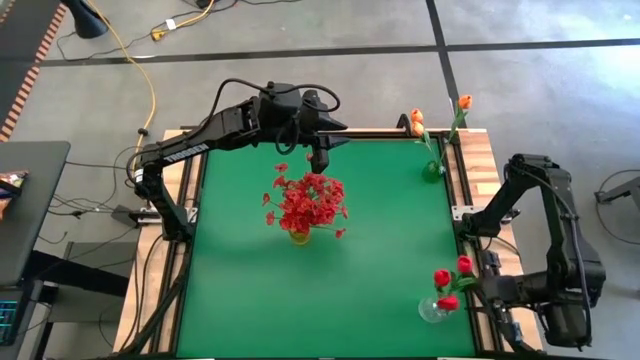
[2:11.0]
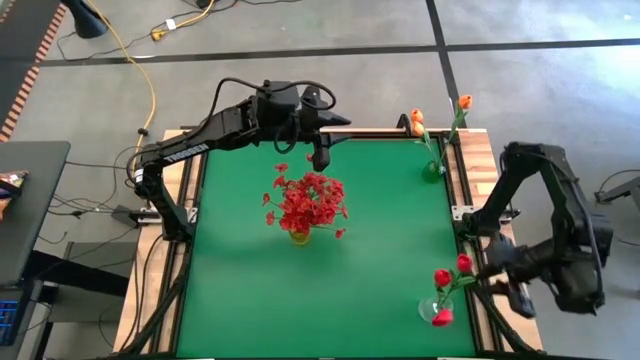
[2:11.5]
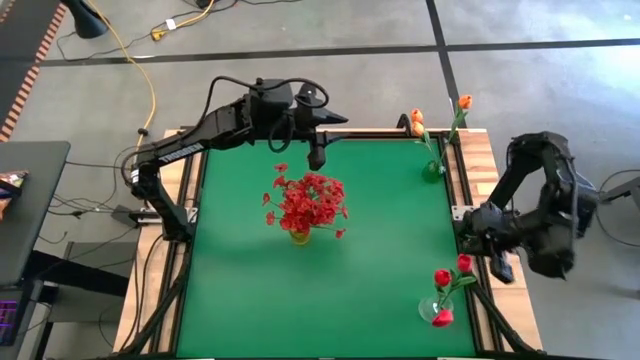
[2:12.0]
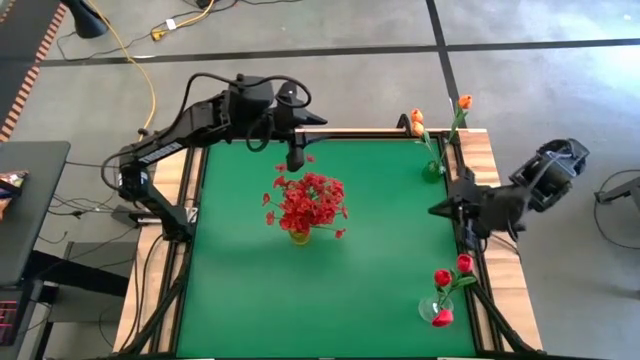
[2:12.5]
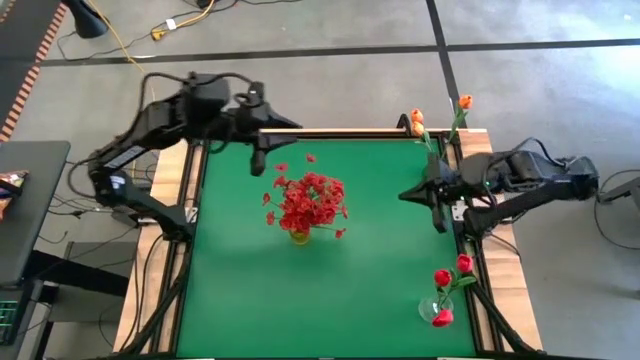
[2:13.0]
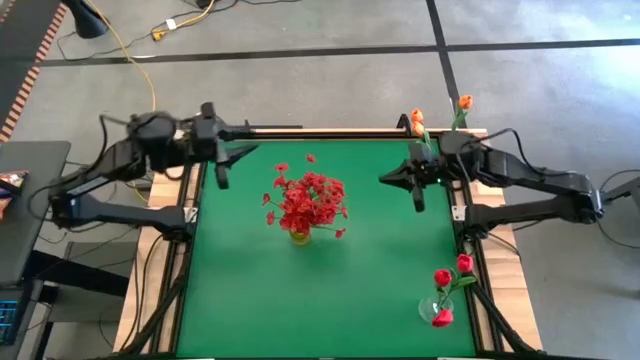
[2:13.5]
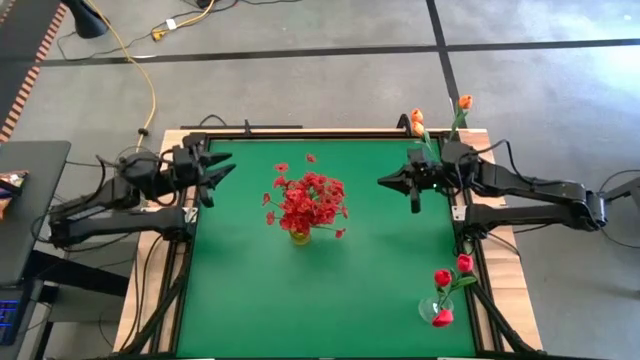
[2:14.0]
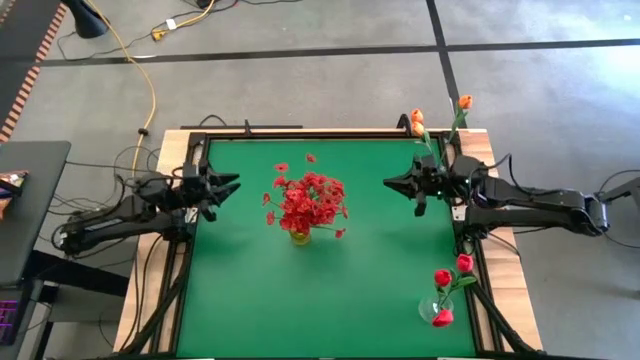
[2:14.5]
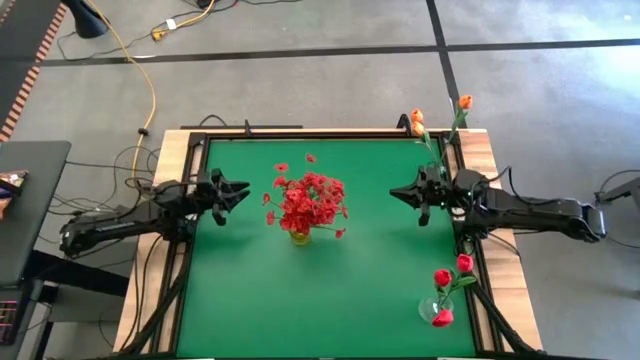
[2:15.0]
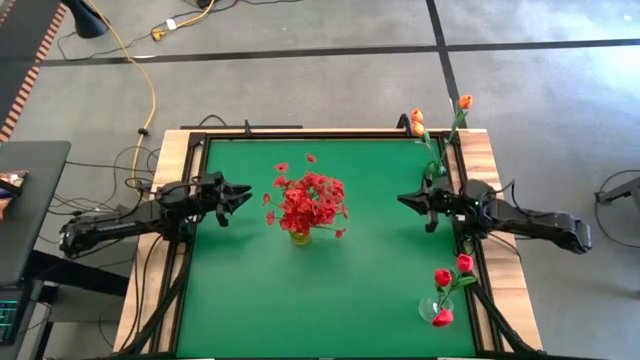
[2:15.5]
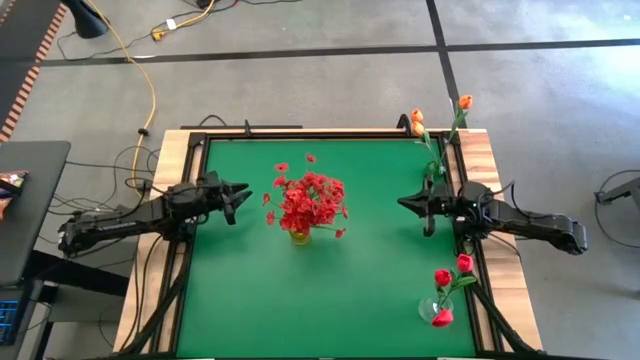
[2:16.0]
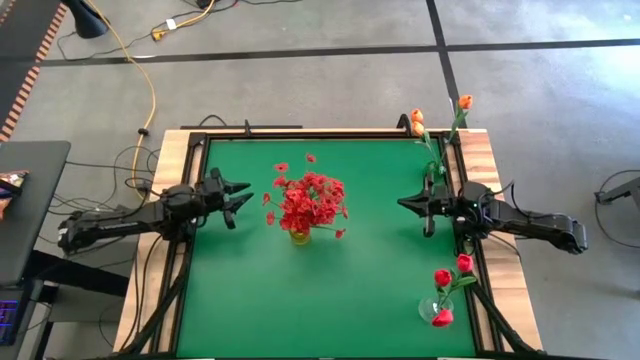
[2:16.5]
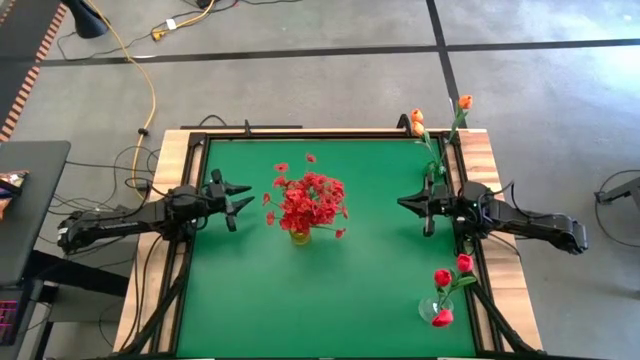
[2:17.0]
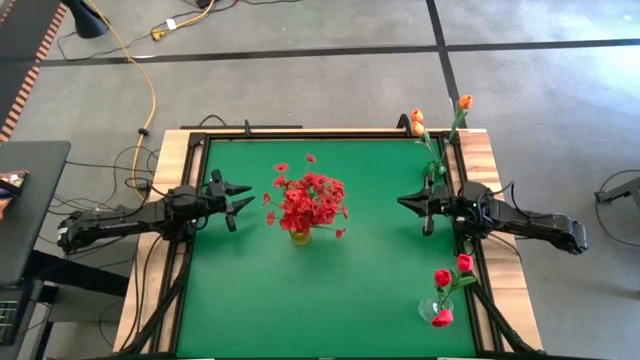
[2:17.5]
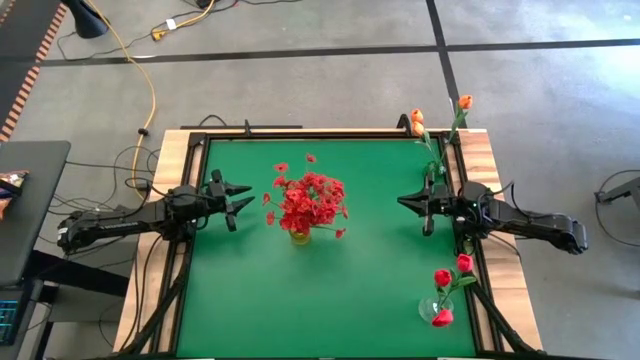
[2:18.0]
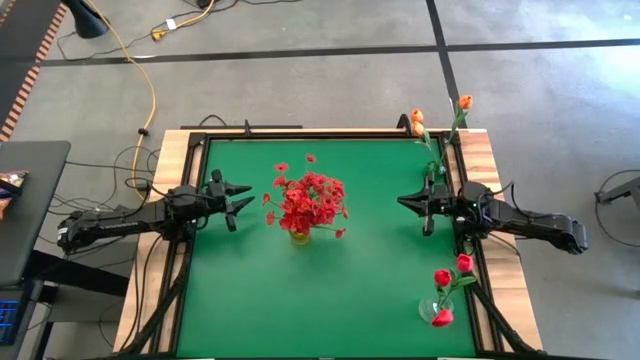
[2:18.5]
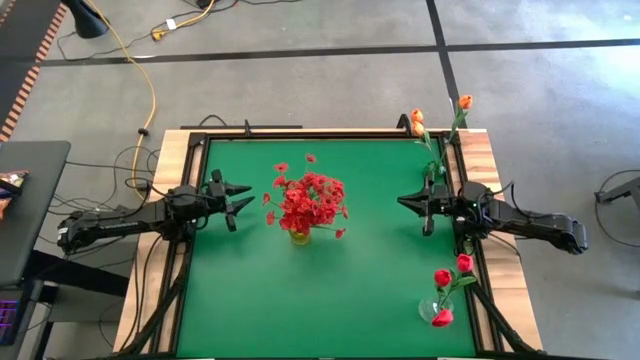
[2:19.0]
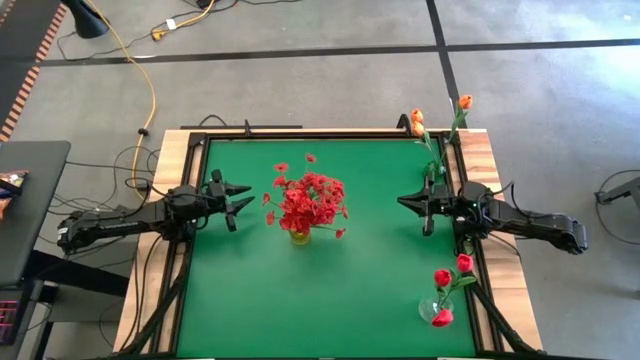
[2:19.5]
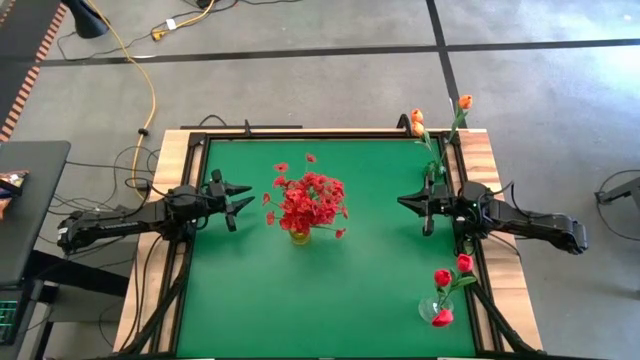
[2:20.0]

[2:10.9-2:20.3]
Task: Sort flowers into vase by color
Return to Home Position

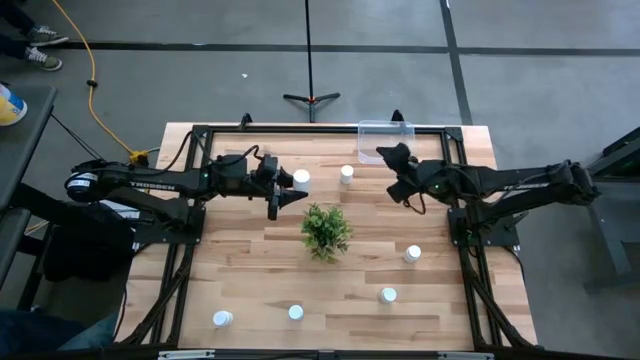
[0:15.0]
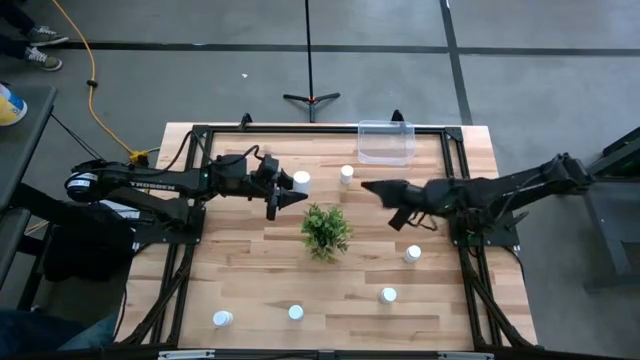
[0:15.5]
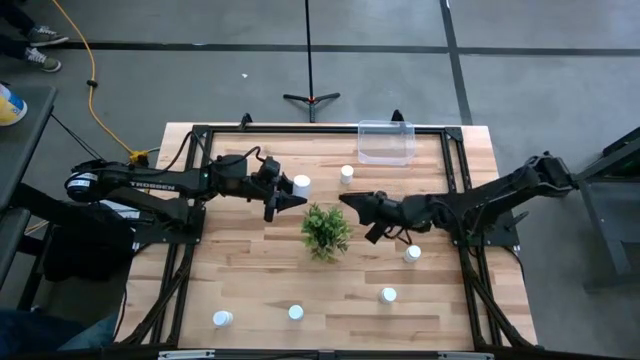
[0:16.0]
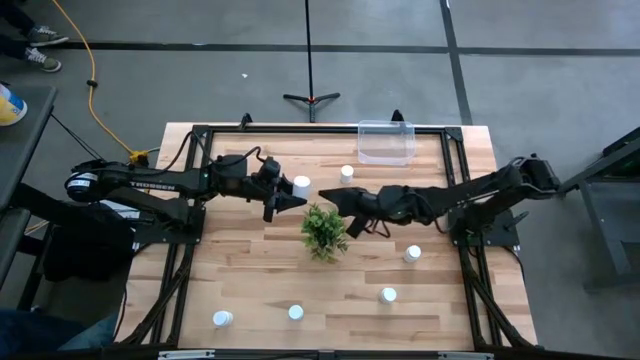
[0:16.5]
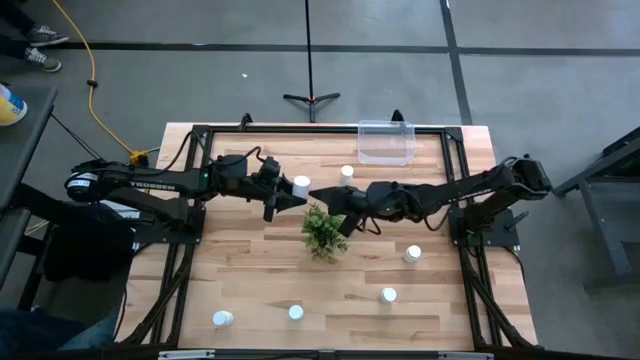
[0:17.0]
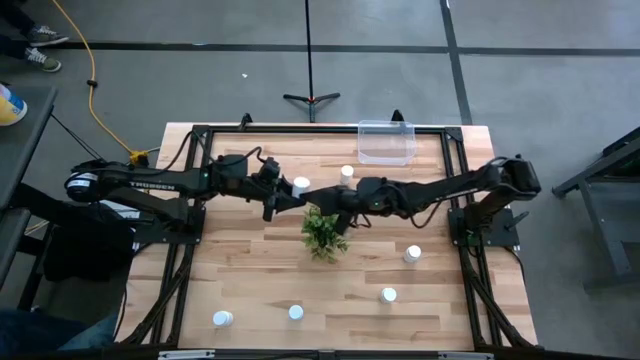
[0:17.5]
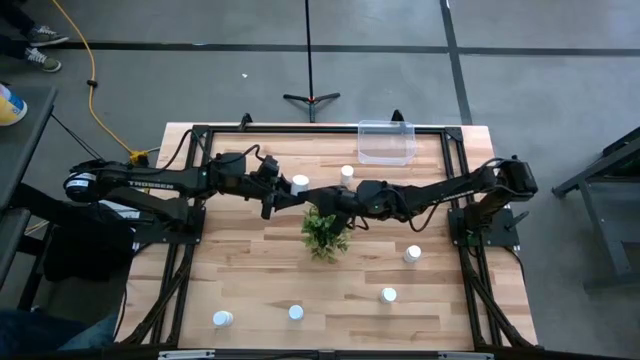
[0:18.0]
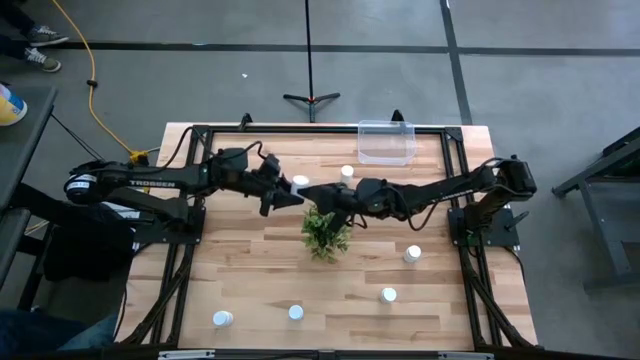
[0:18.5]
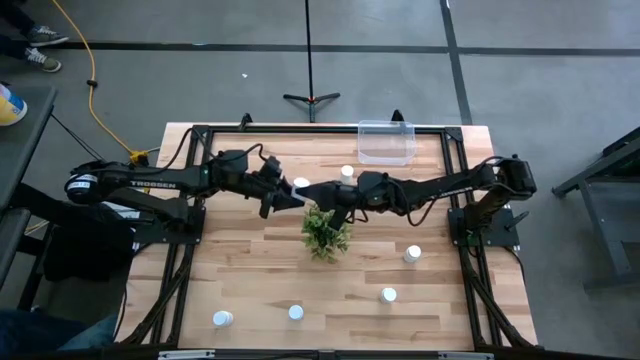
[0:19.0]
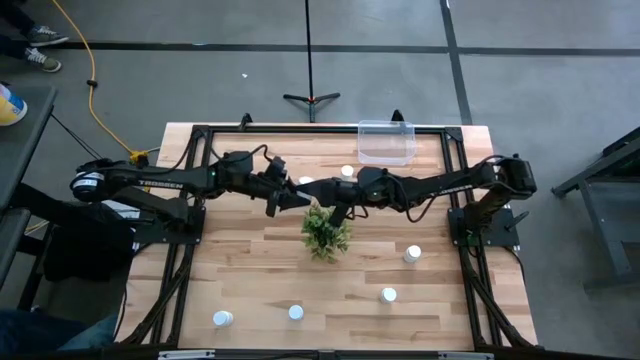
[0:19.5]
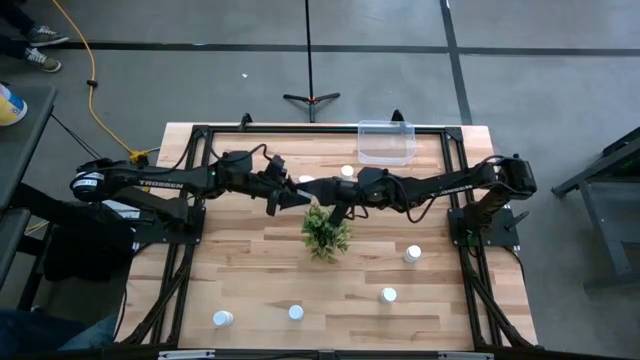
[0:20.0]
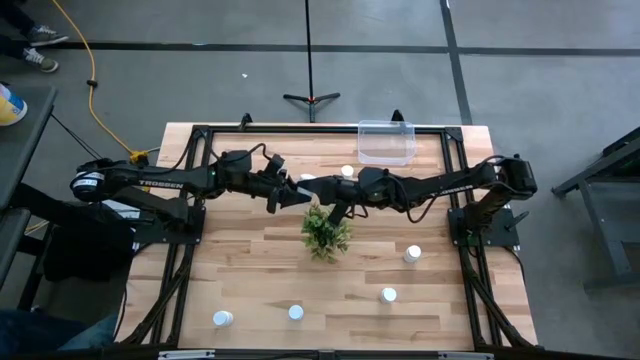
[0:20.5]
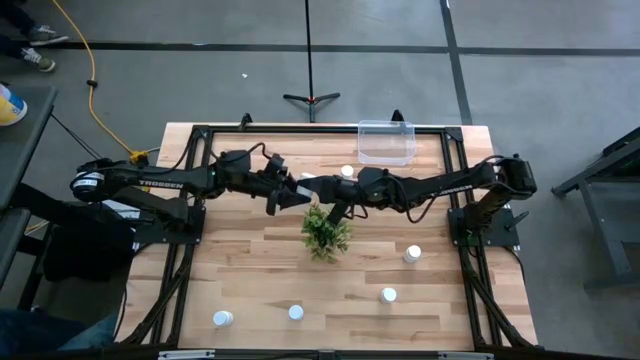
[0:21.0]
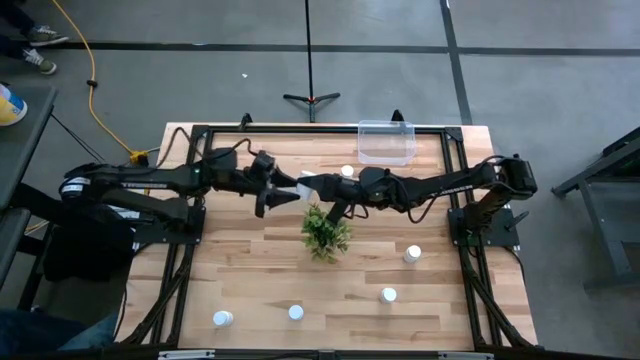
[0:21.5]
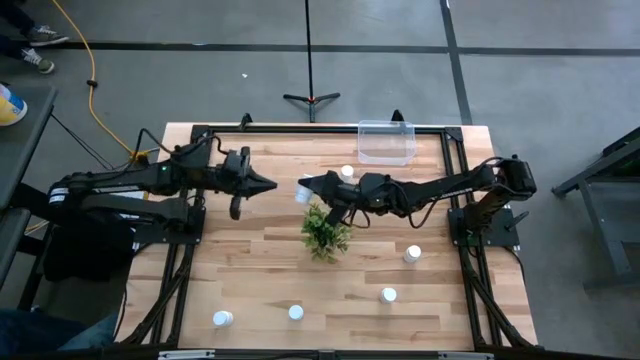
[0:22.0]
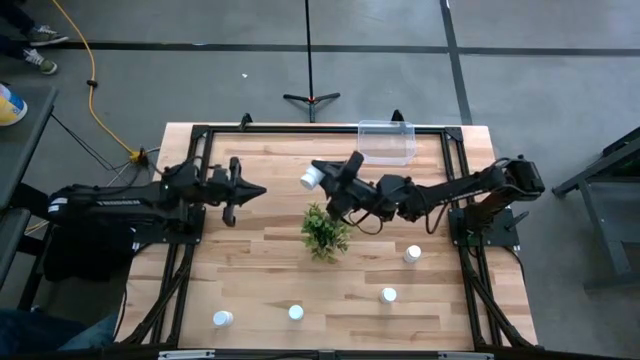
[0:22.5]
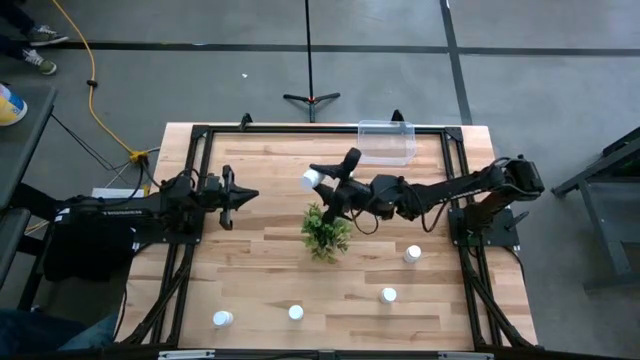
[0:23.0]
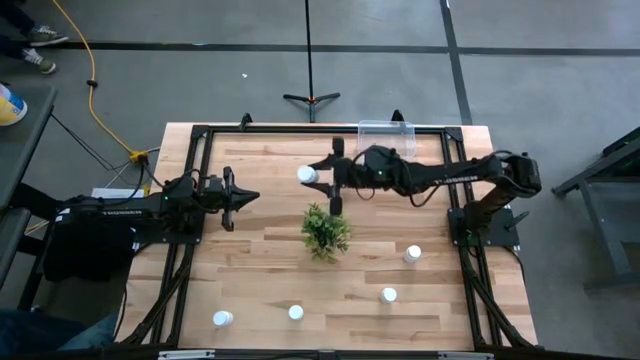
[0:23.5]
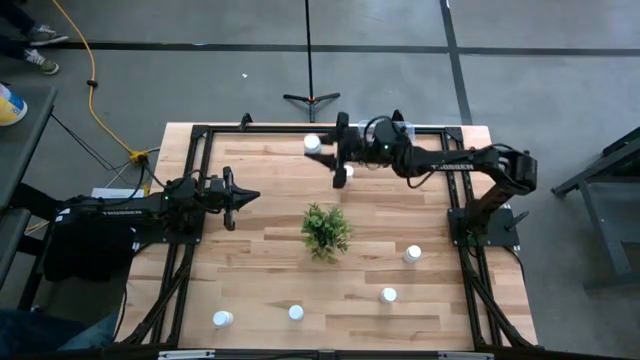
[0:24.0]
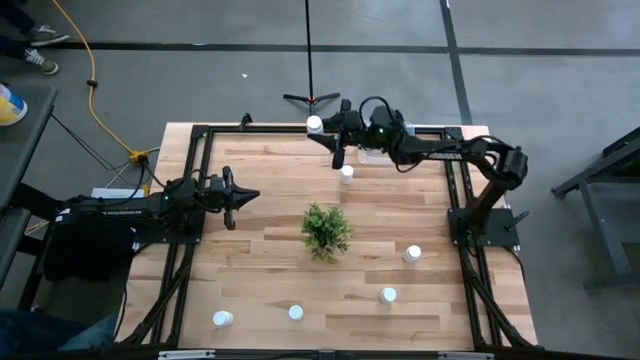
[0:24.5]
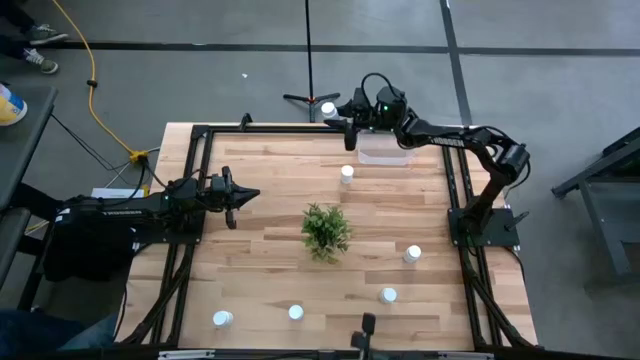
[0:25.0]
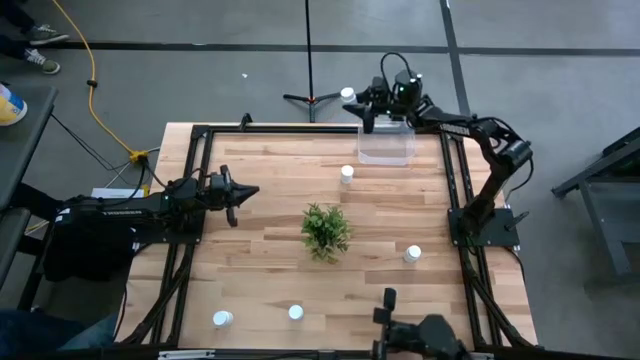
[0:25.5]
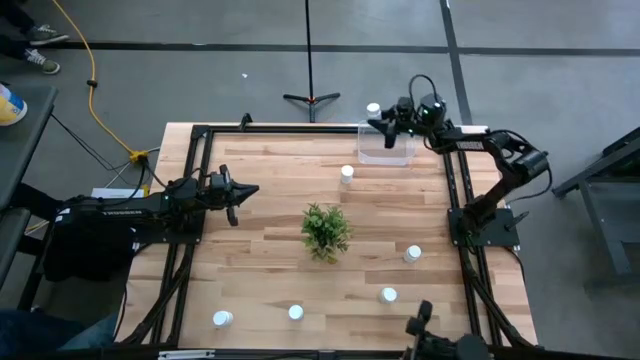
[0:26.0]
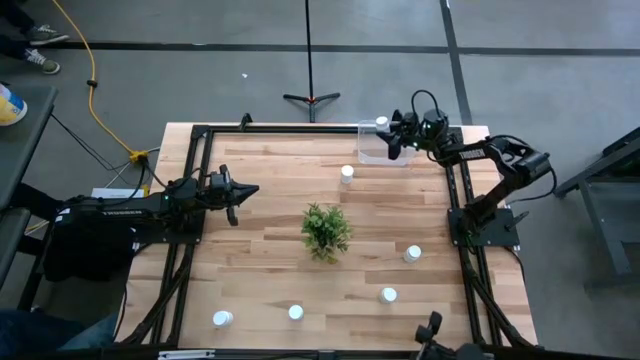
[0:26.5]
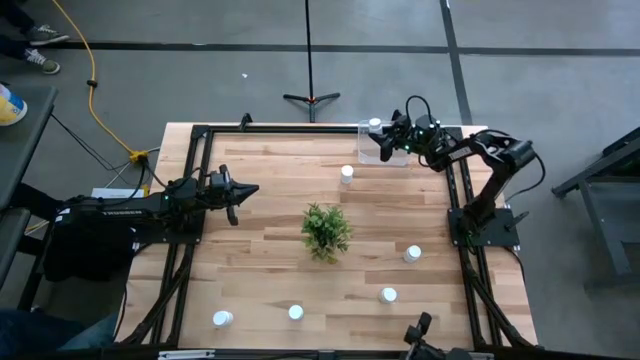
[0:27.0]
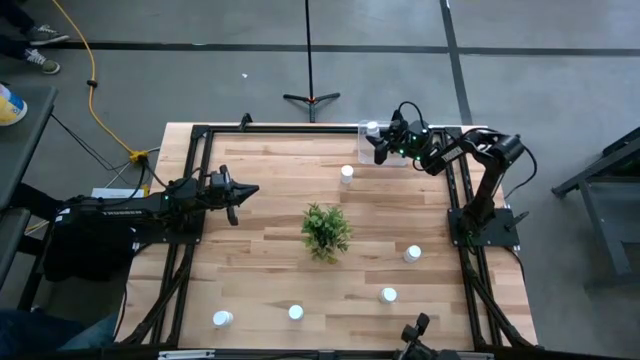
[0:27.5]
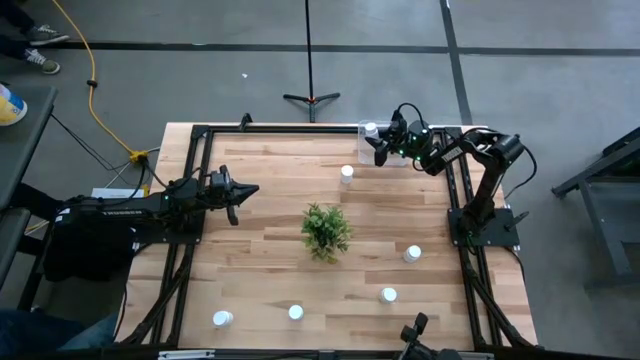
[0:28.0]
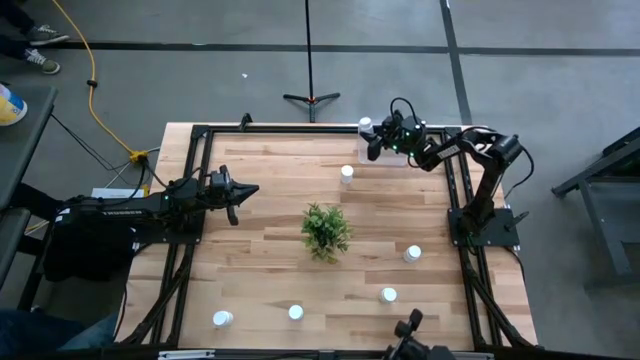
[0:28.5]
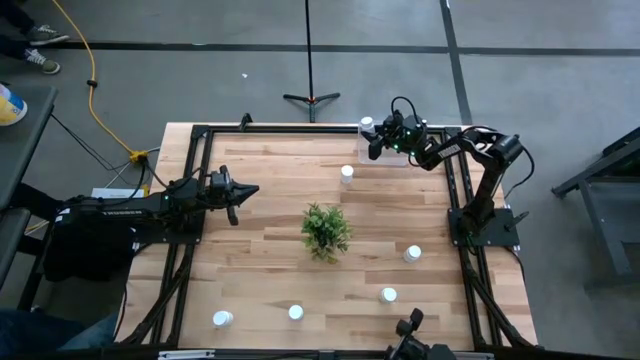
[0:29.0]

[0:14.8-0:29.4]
Task: Pick and place pill bottles into a basket
Put the white pill bottle into the transparent bin
